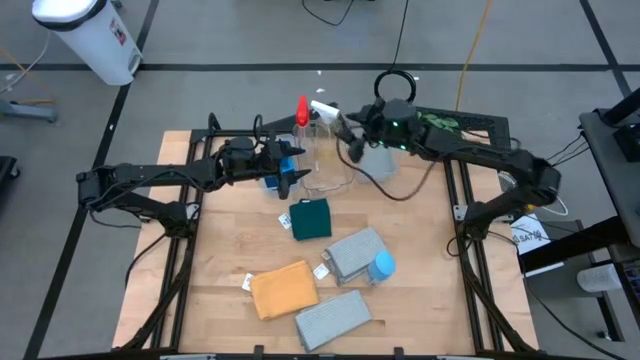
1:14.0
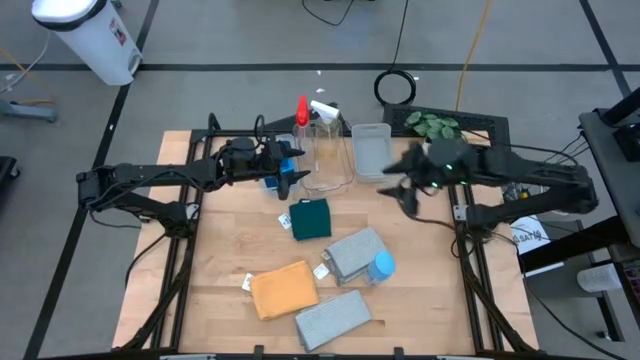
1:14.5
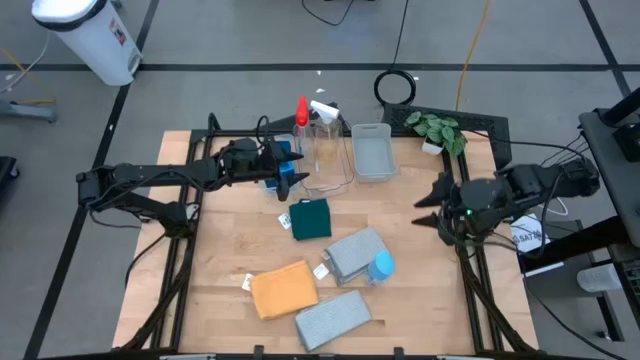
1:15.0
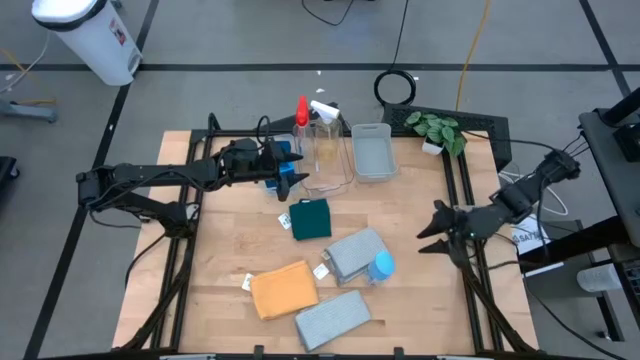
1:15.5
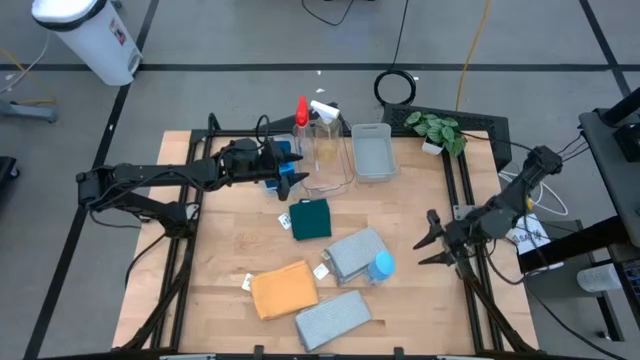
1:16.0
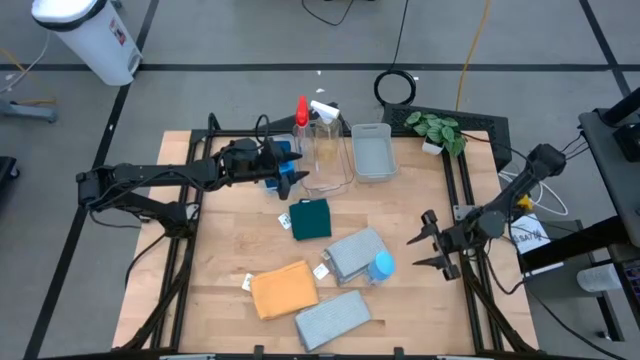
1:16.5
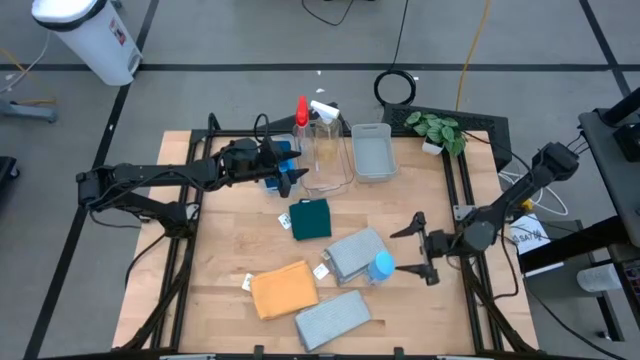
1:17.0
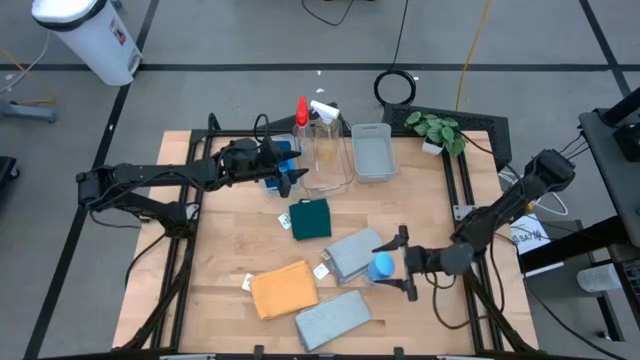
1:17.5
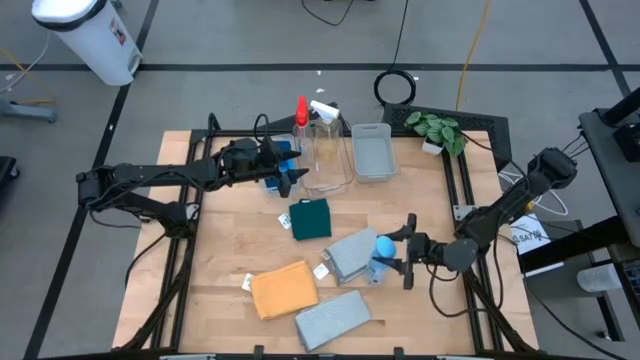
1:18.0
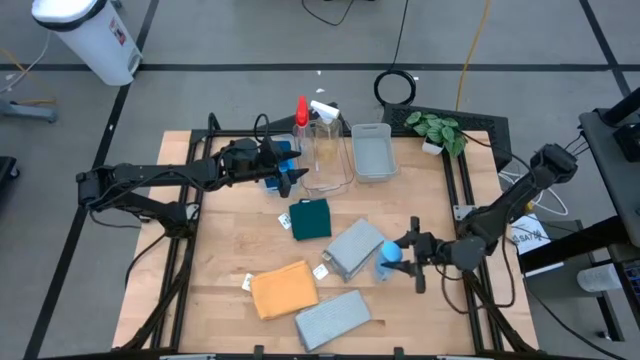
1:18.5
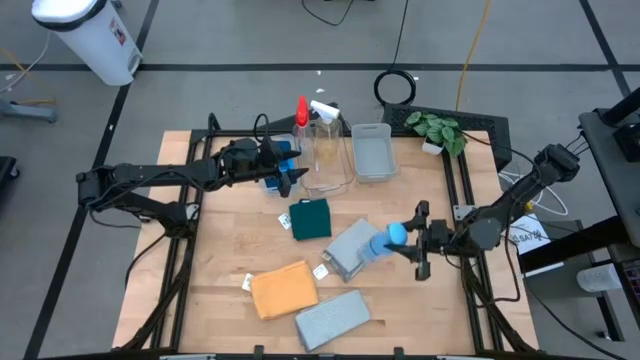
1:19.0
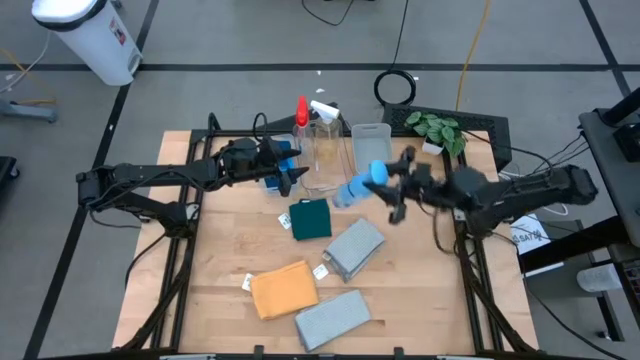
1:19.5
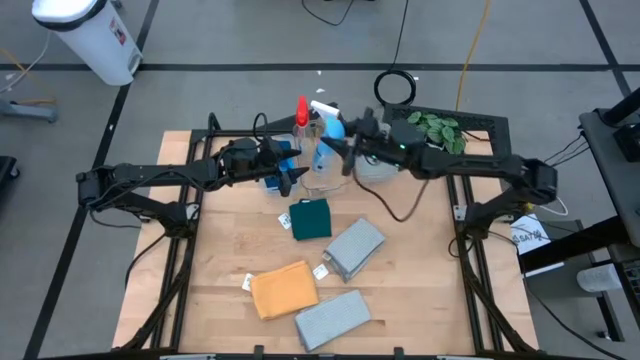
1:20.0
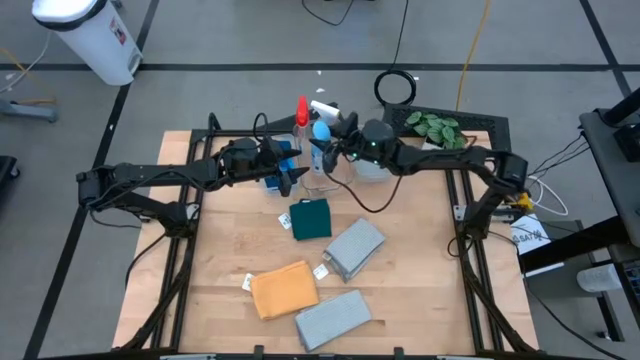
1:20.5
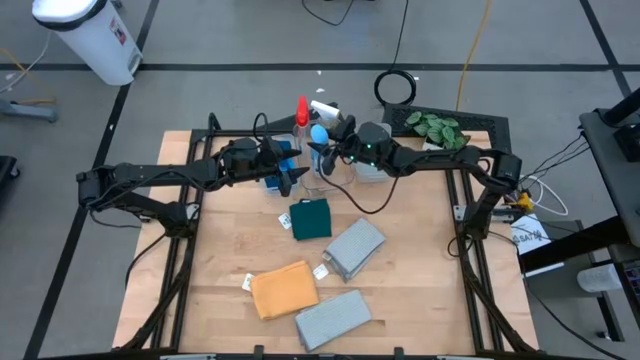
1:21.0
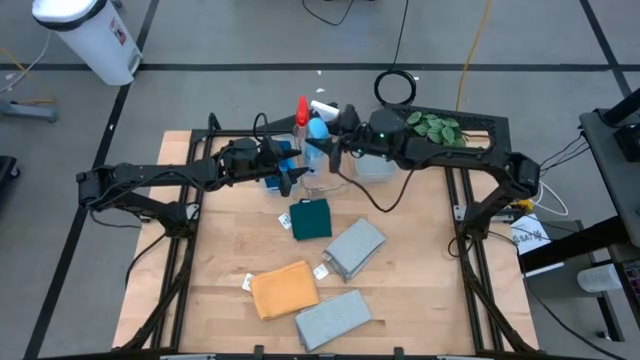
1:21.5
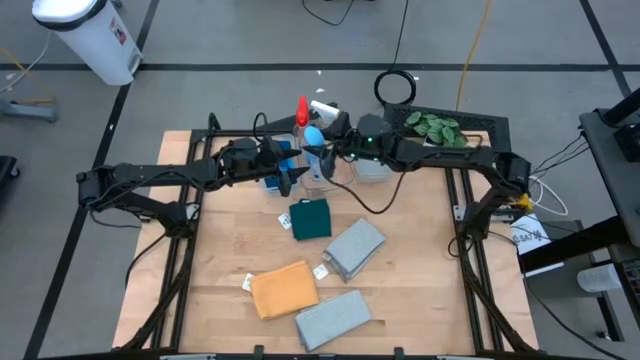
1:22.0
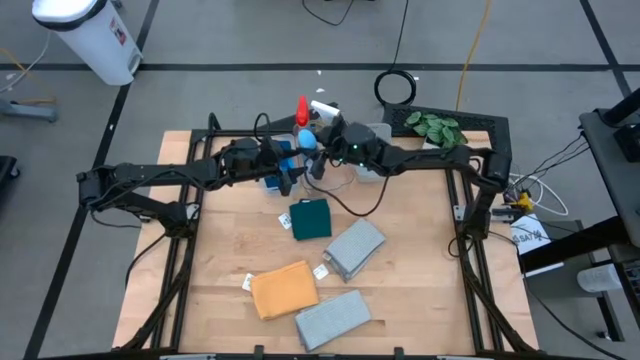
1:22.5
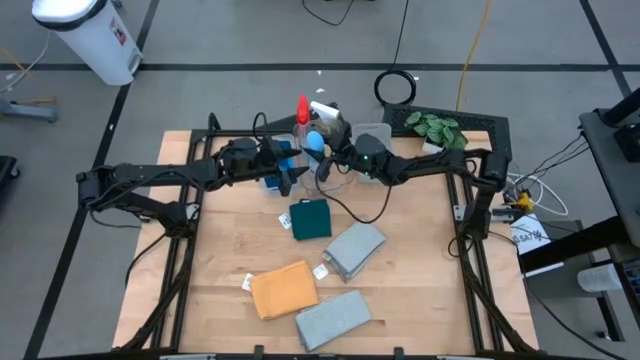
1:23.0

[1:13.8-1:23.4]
Task: Pick & Place Kitchen Items
Put the blue air freshener spray bottle into the transparent bin

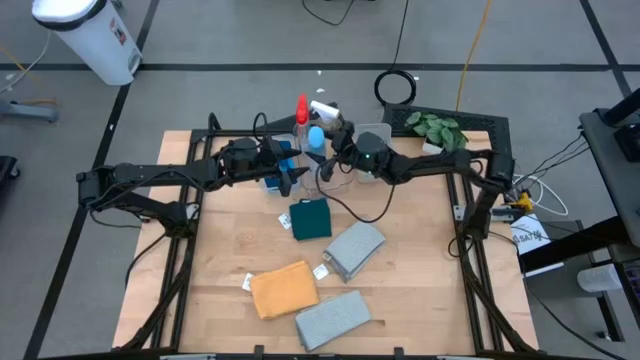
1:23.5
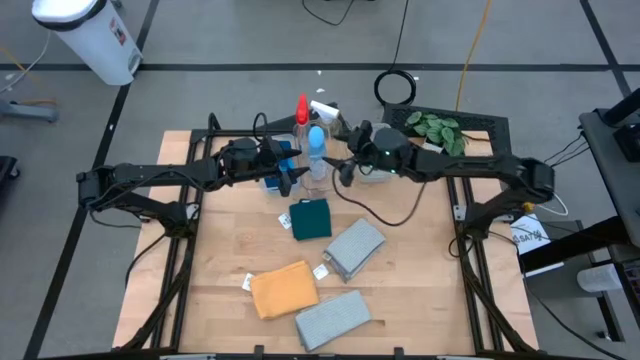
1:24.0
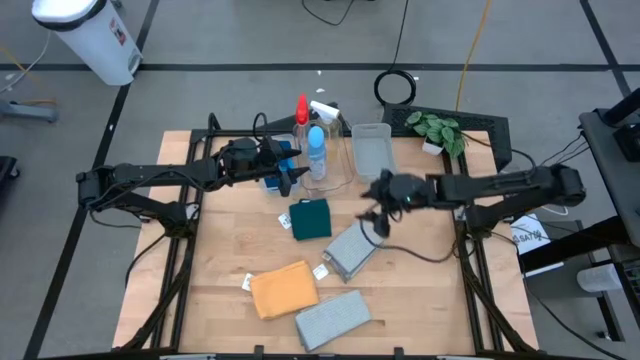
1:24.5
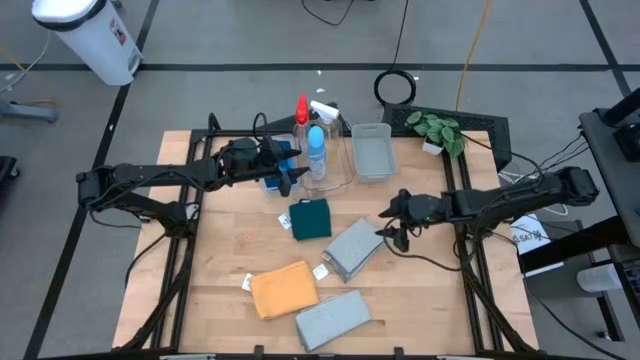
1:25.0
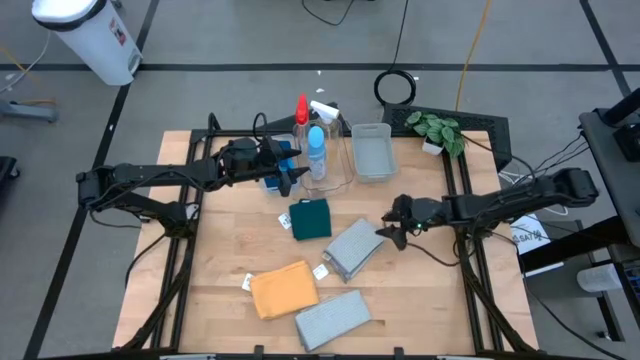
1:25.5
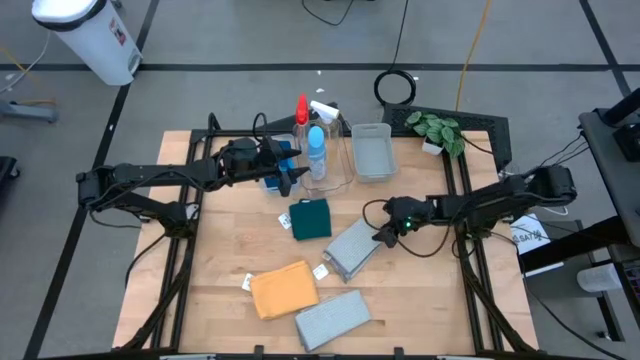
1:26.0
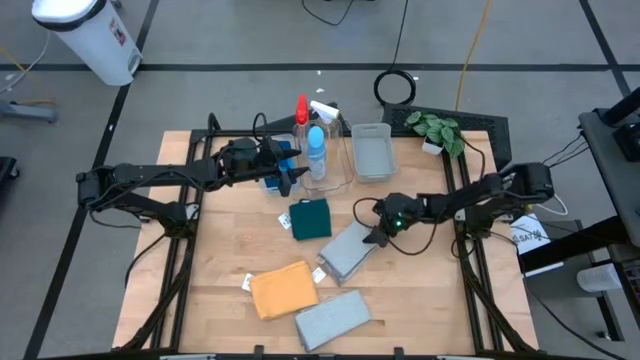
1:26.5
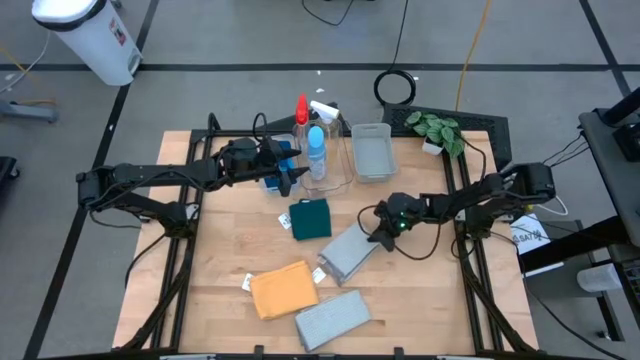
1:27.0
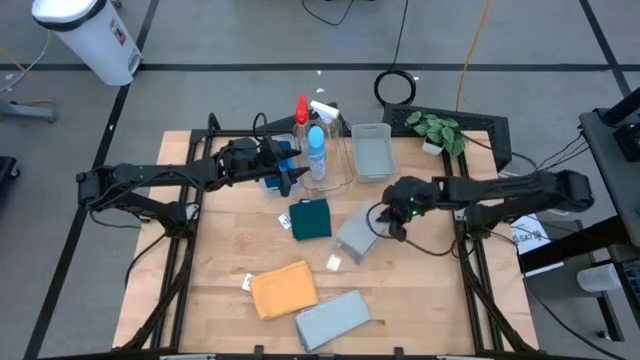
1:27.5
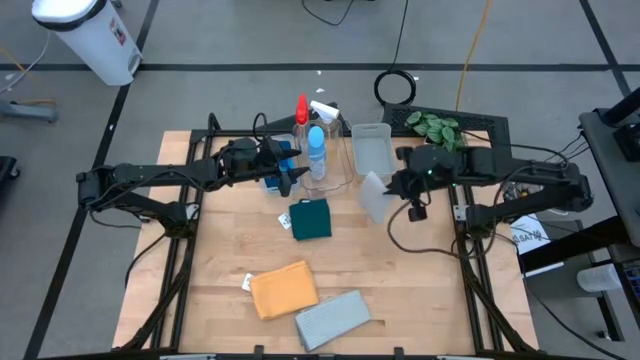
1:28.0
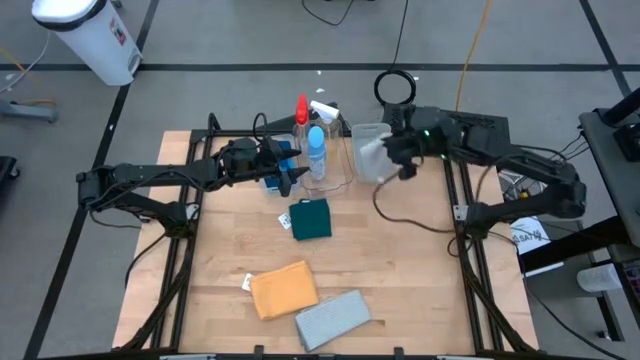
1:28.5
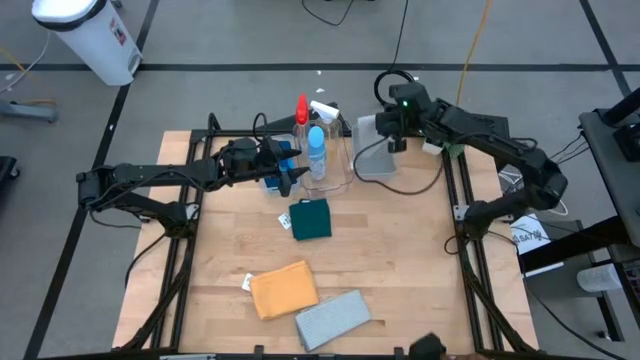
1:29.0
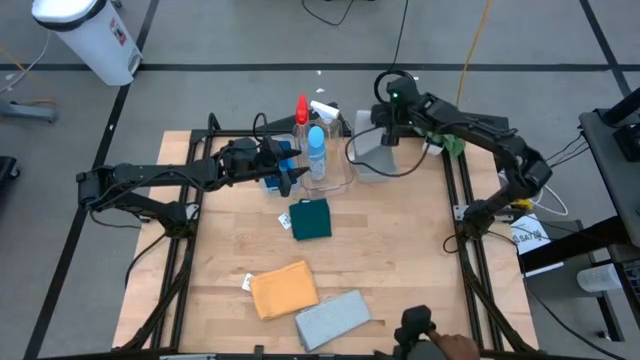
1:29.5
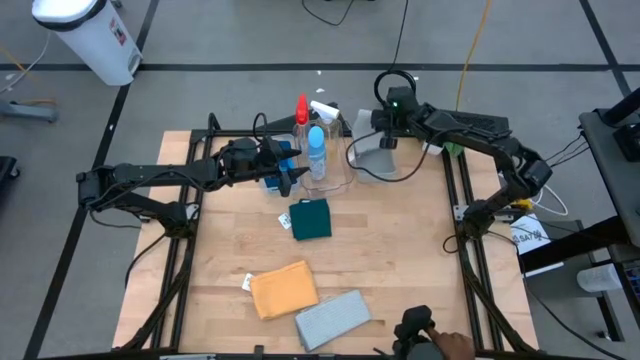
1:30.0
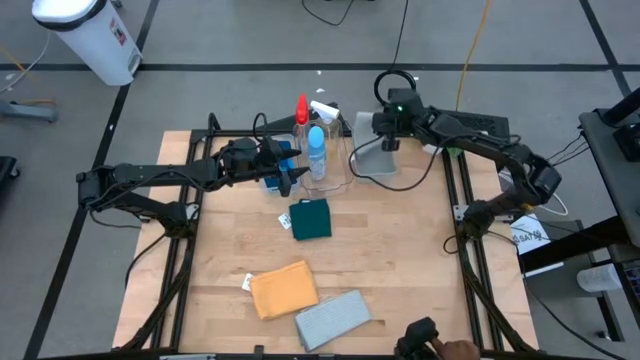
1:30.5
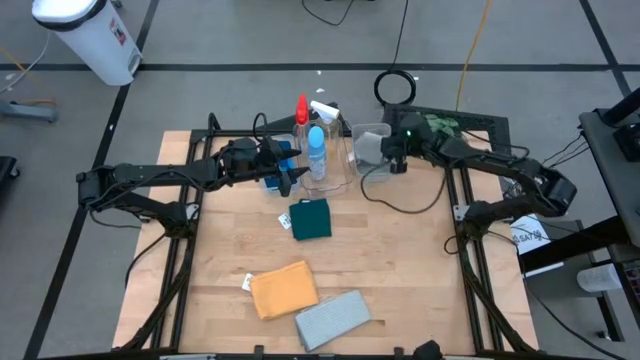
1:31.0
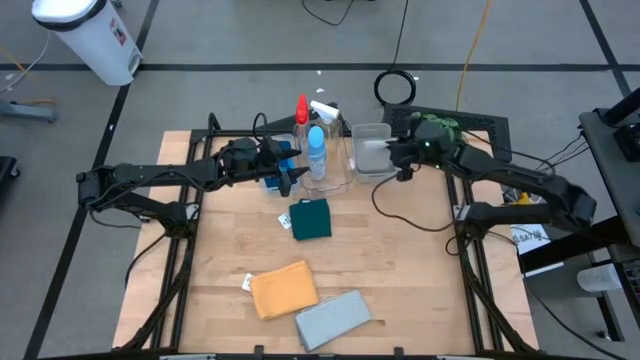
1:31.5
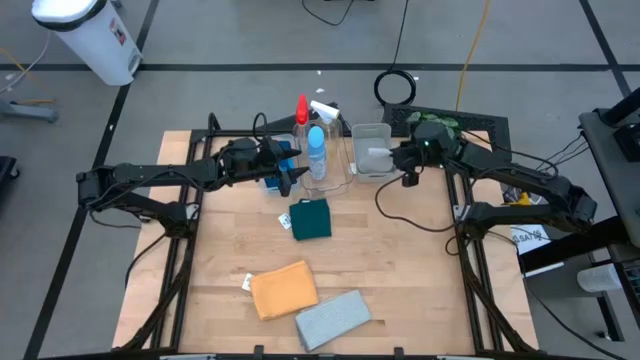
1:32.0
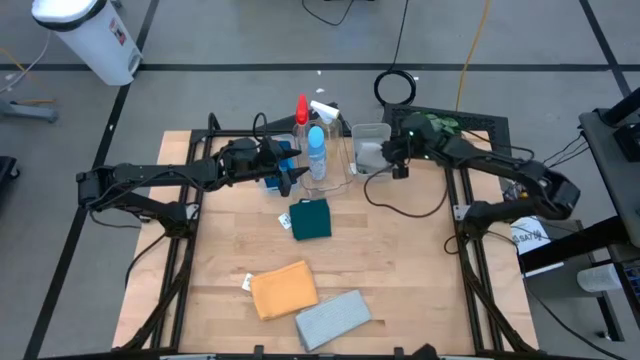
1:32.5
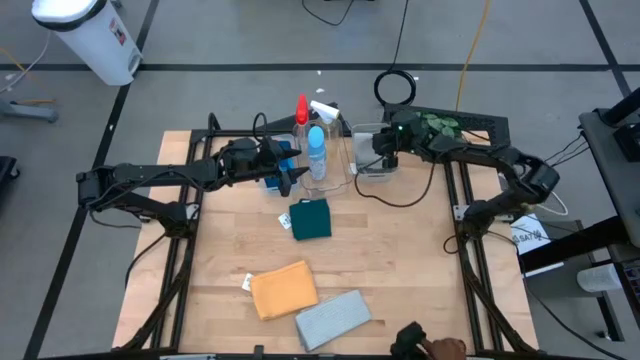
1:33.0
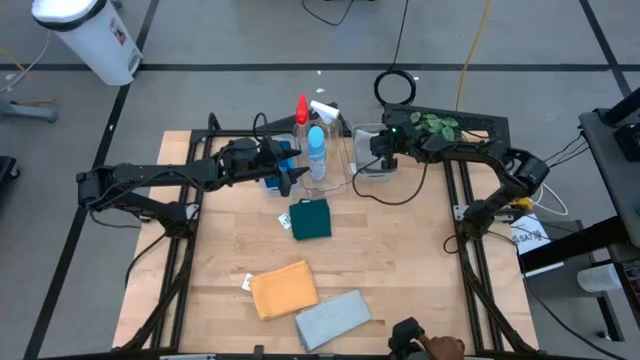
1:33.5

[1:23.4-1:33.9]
Put the gray microfiber cloth into the gray bin
